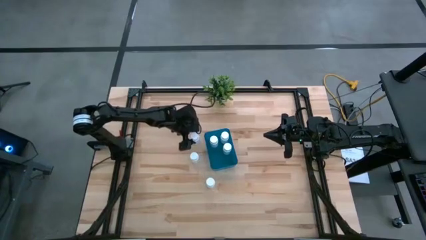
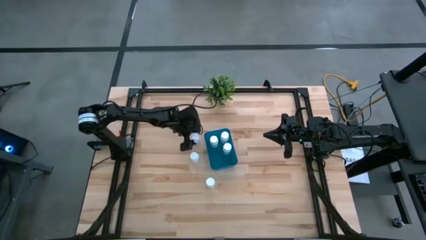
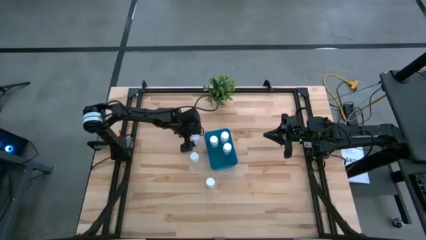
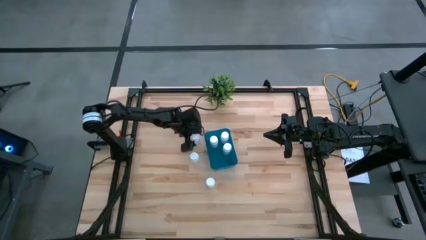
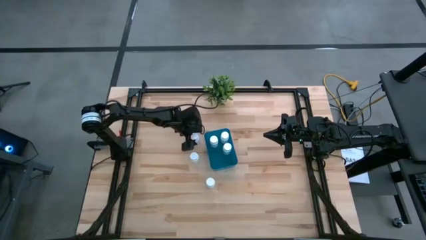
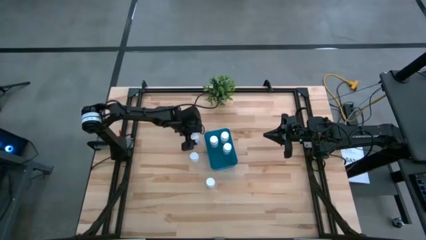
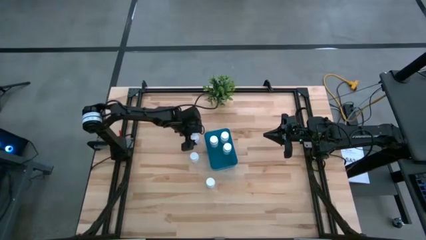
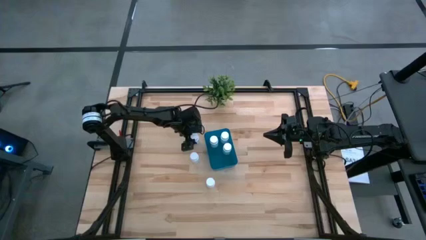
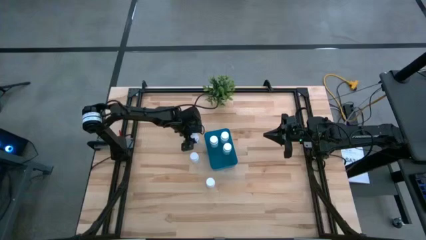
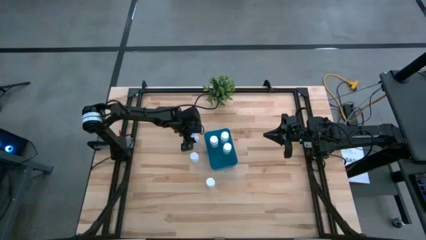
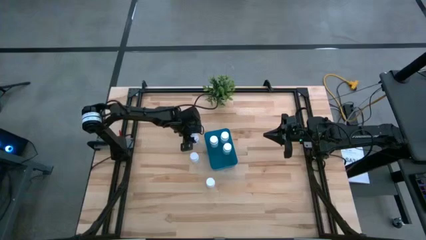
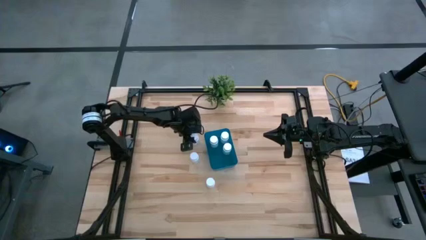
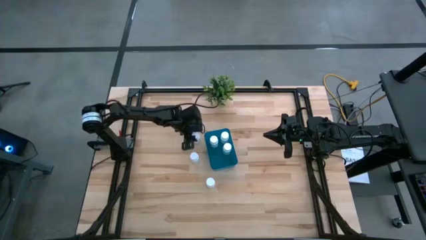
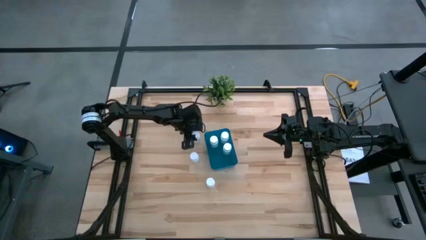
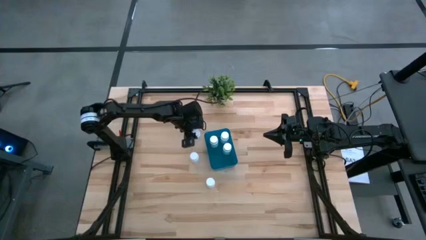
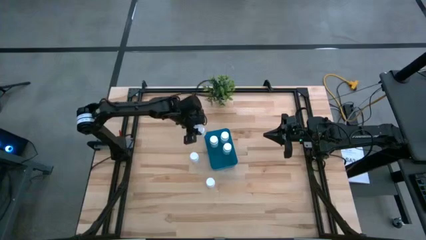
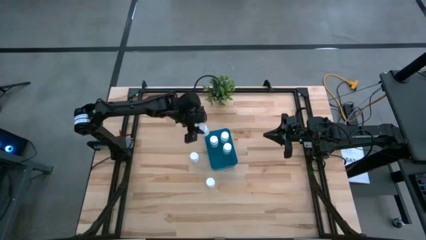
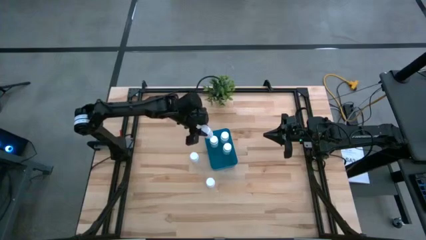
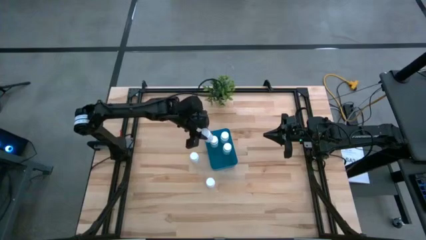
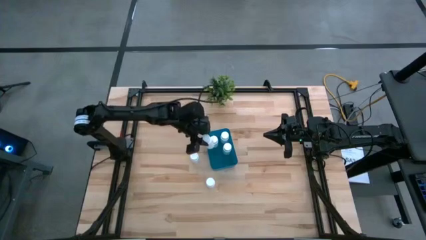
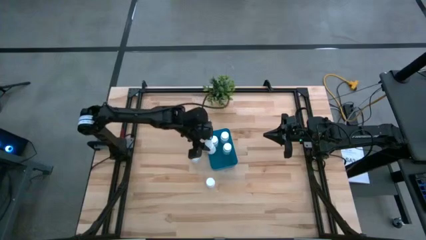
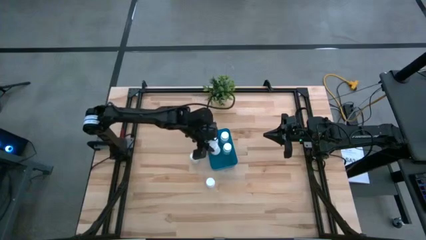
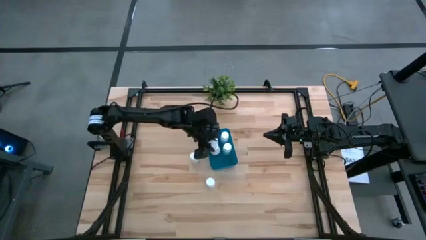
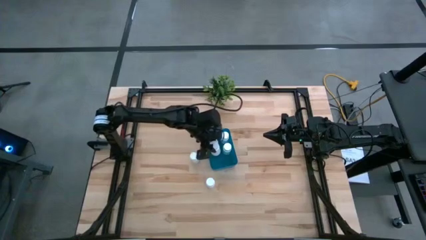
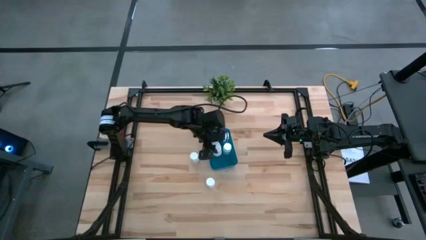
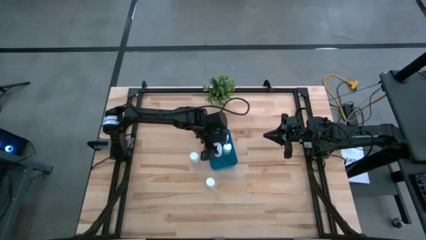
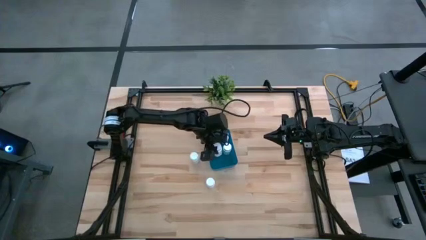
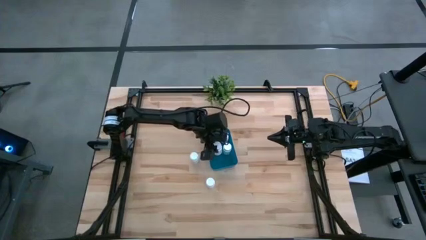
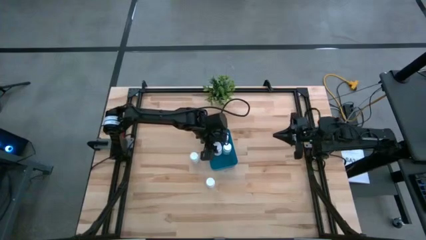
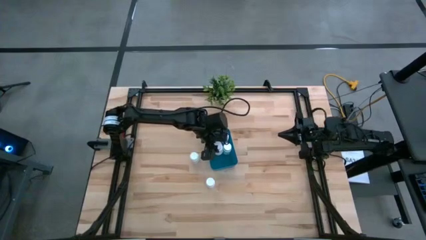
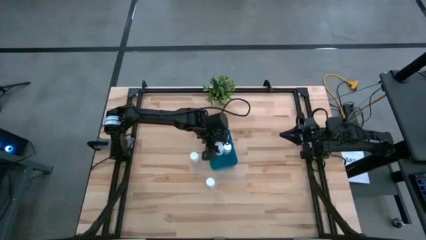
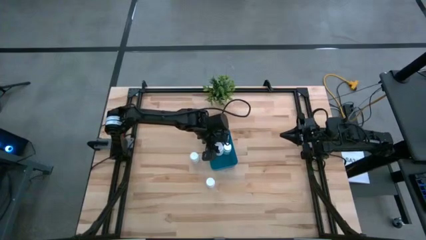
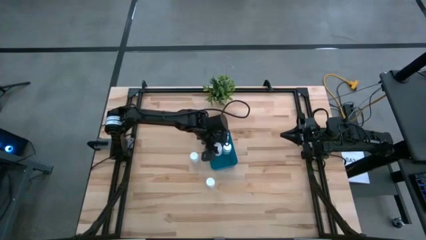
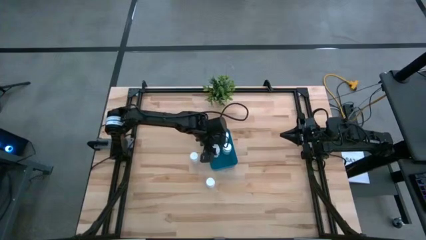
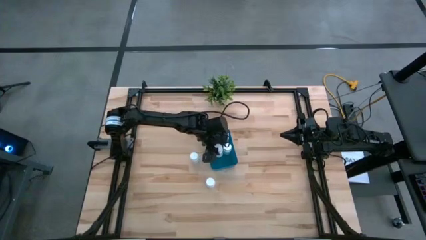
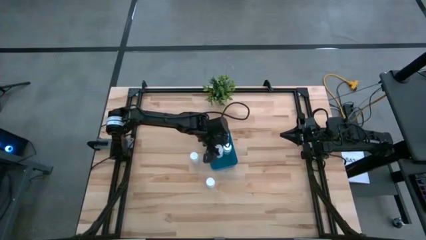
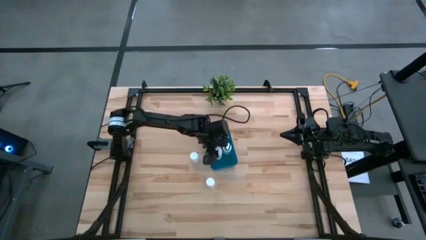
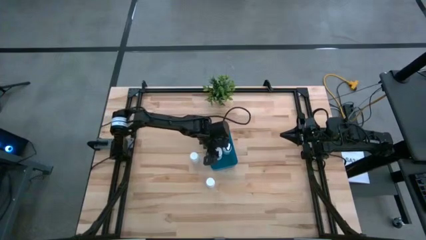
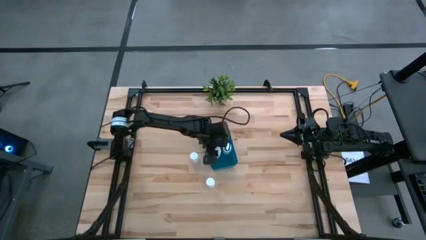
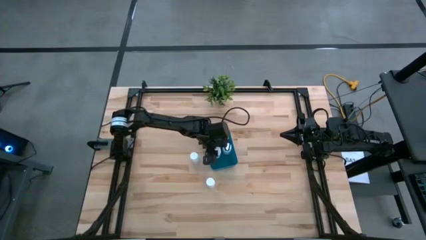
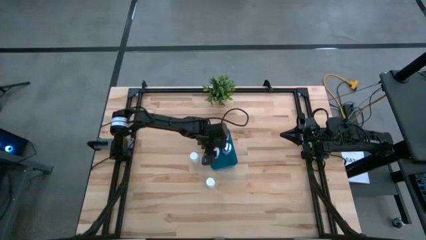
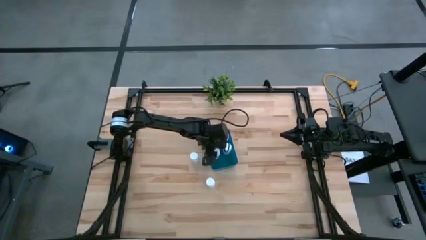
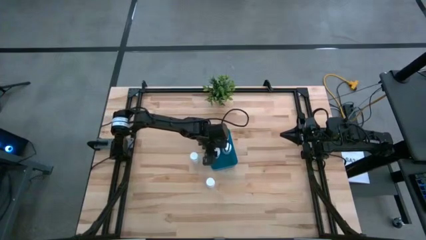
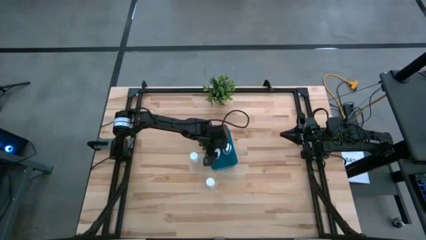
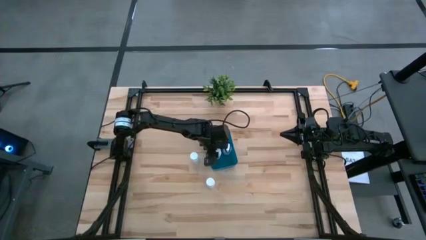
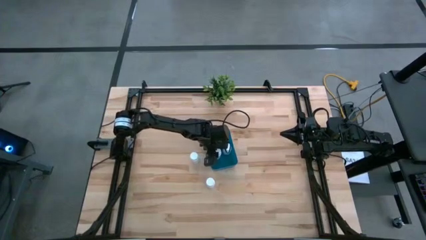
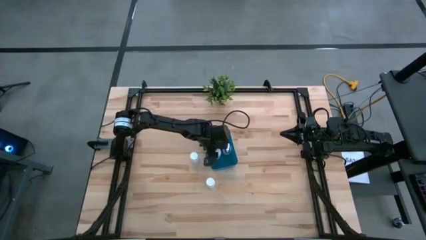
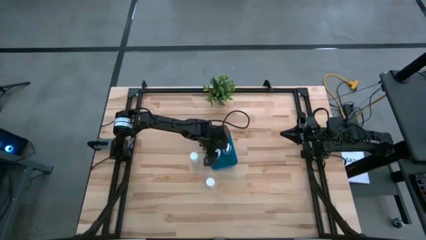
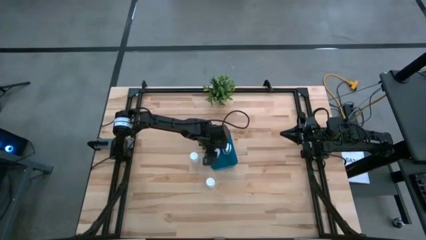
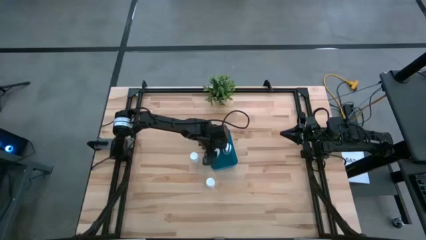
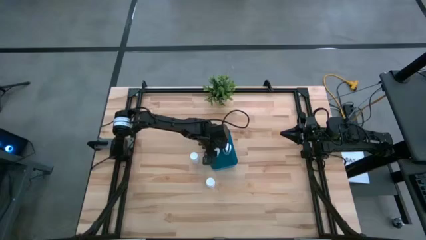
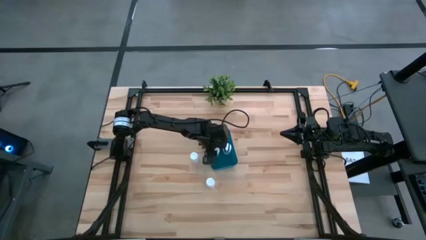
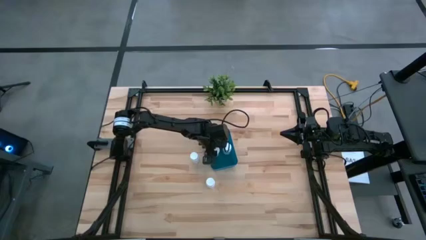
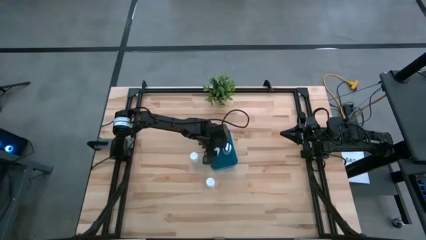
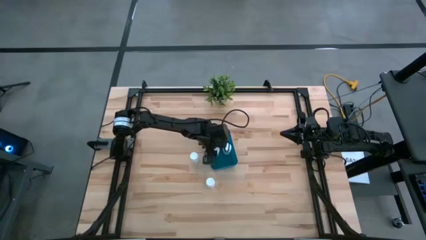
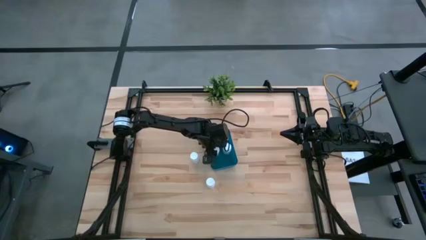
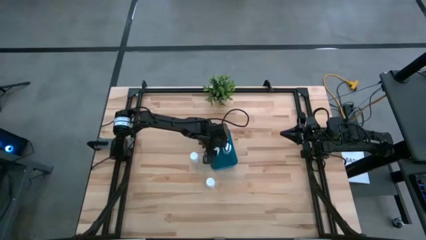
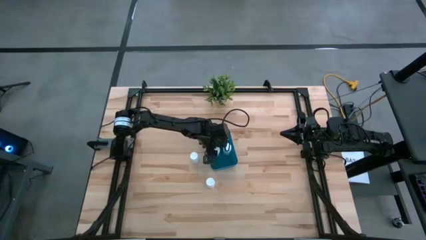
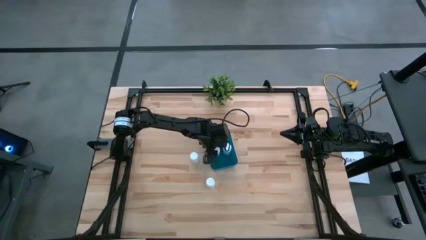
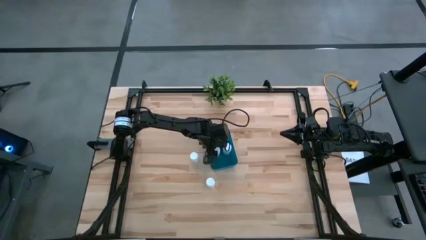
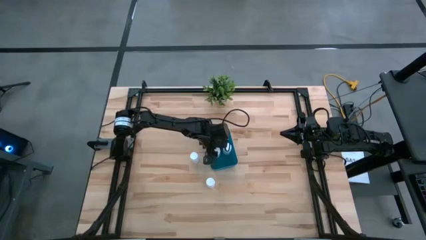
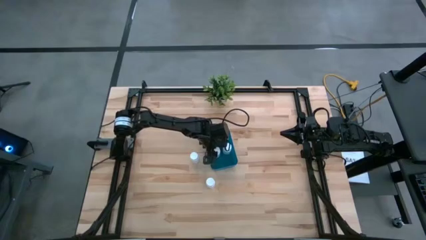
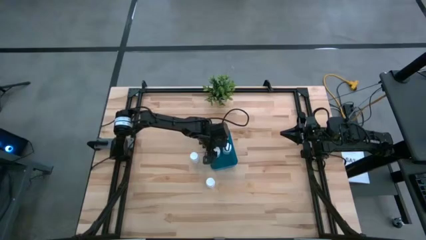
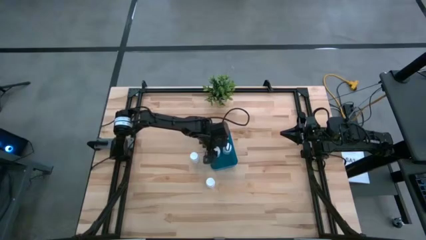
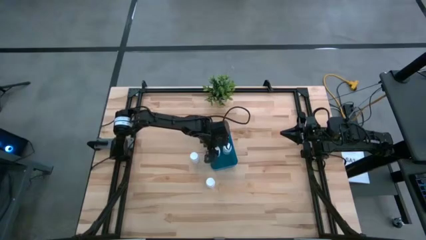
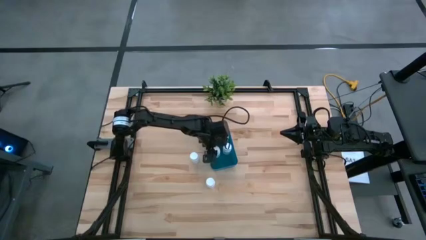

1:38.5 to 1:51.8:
Task: Pick and place pill bottles into a basket
Put the top white medicine bottle into the blue bin
